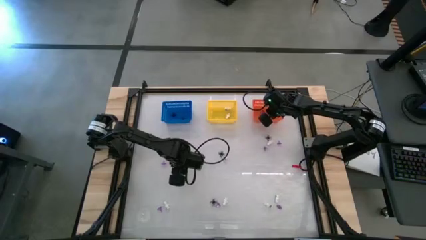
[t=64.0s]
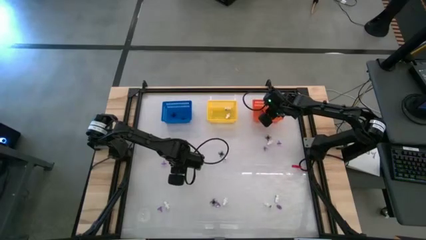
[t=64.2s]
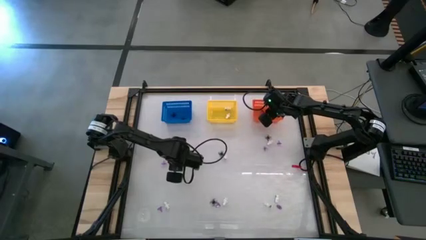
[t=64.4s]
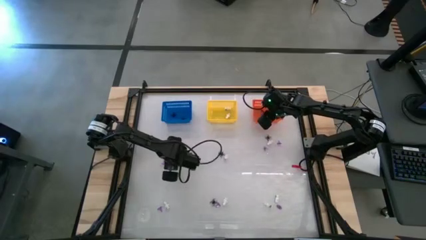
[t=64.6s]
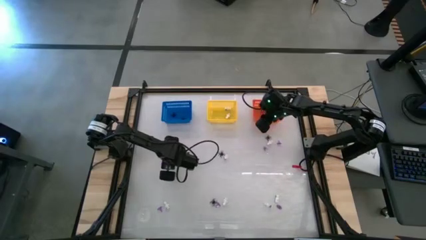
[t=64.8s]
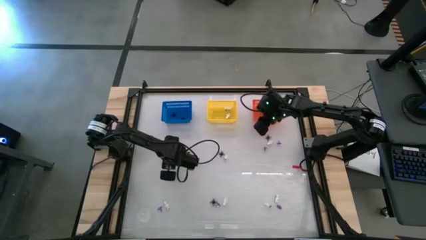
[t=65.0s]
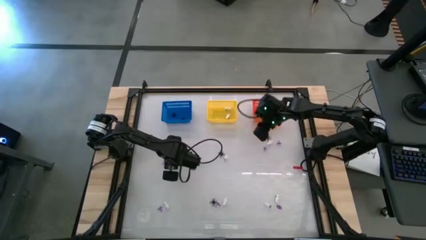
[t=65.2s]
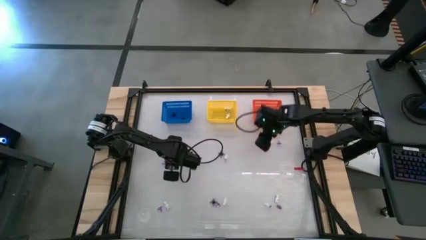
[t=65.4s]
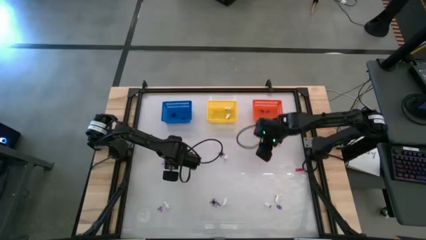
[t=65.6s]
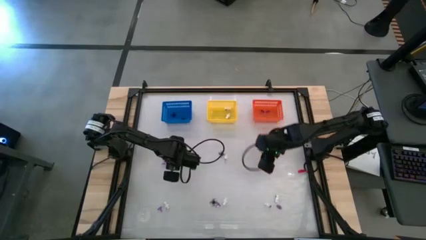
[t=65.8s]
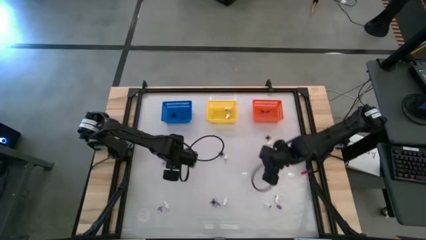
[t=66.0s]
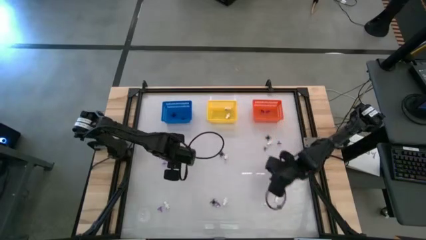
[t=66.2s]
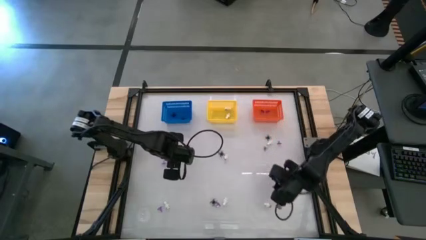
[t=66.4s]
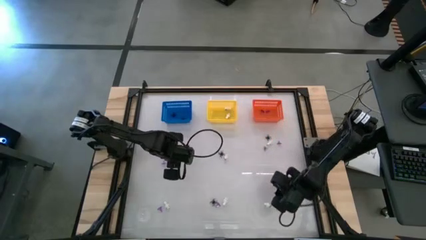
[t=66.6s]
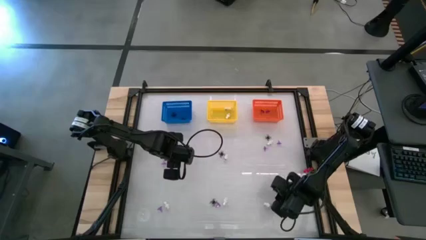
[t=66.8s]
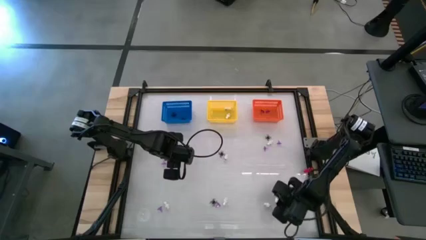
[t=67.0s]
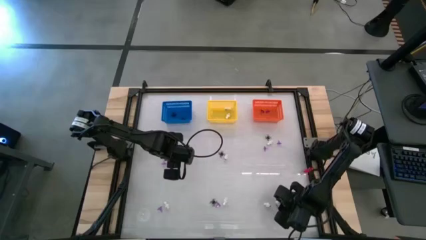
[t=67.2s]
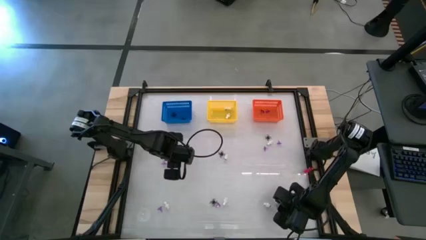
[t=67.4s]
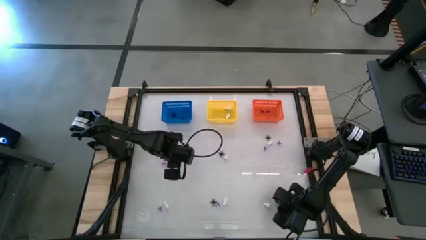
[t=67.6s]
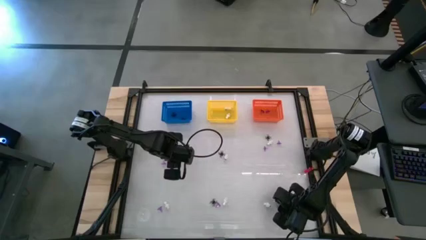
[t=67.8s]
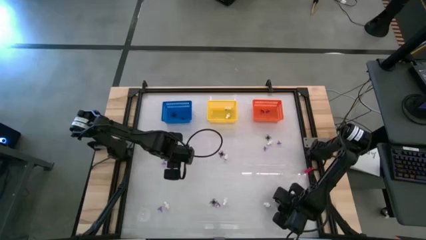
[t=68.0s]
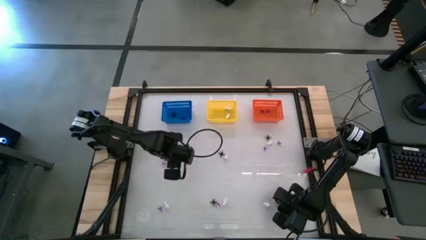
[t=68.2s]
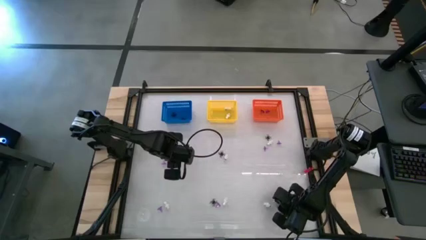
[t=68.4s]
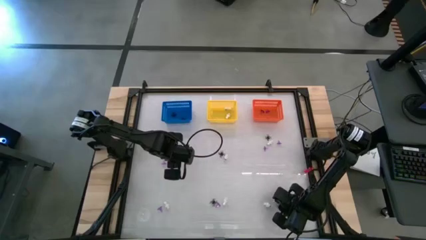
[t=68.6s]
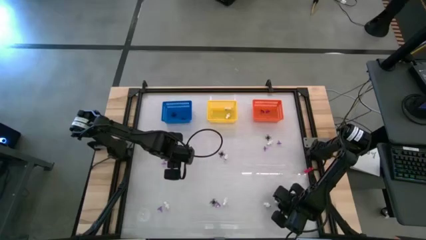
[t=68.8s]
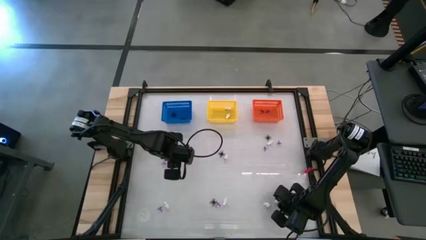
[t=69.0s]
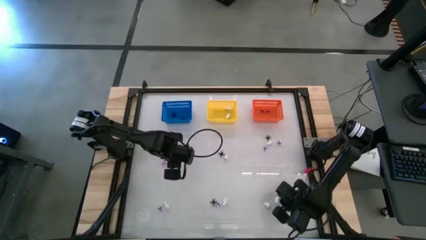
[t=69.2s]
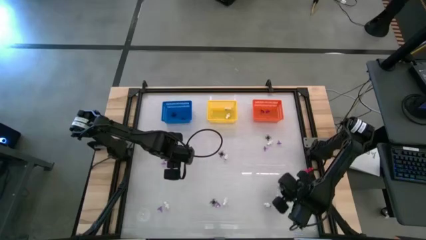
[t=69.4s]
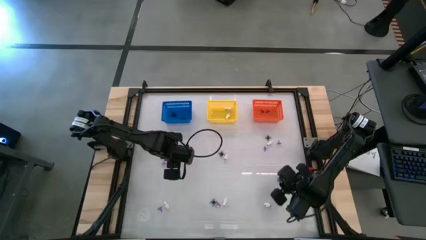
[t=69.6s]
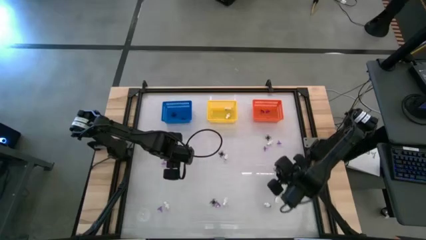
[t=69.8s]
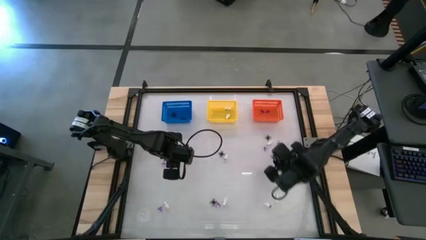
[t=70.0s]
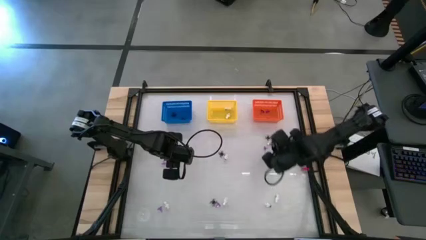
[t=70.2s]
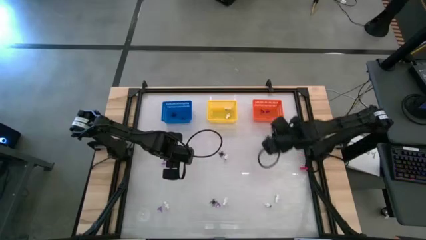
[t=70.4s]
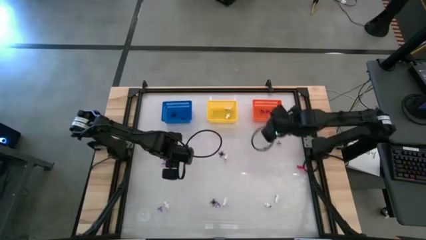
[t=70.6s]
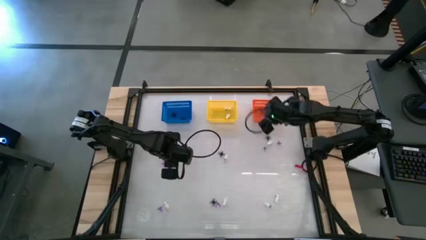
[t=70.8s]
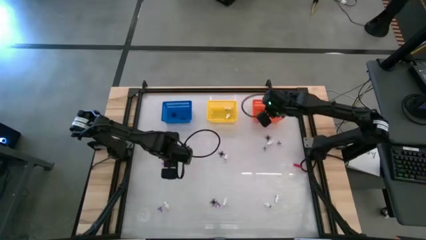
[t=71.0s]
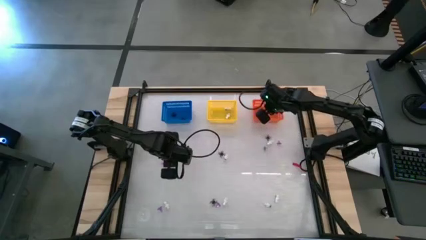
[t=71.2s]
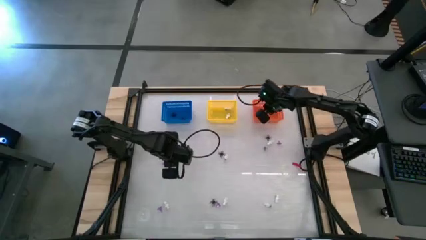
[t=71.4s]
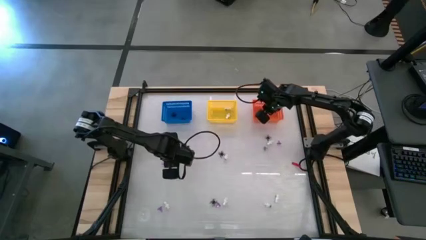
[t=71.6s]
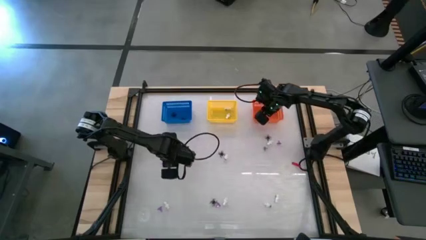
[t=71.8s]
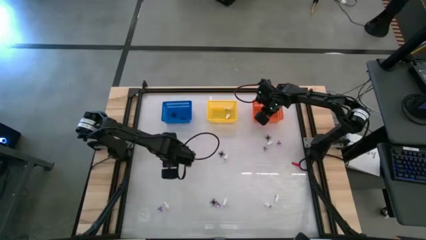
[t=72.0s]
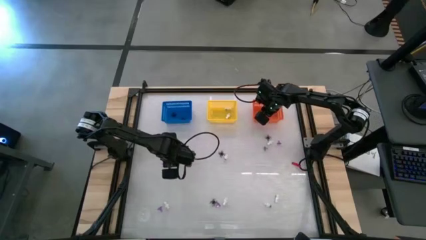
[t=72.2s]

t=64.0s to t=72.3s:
Task: Sort Halloween decoration
Put the purple witch hat toy into the orange basket

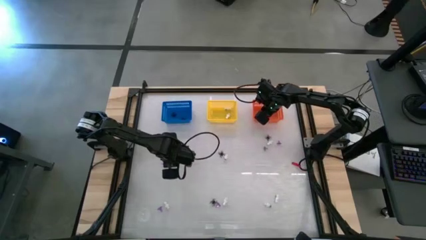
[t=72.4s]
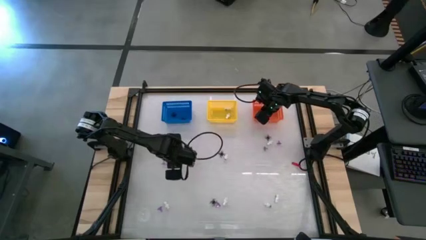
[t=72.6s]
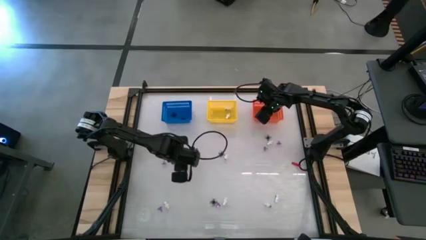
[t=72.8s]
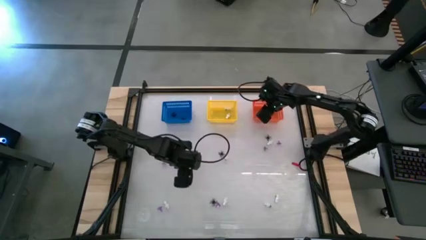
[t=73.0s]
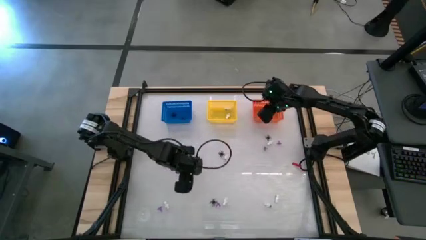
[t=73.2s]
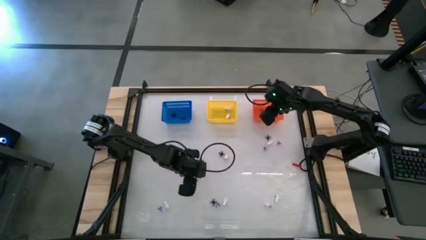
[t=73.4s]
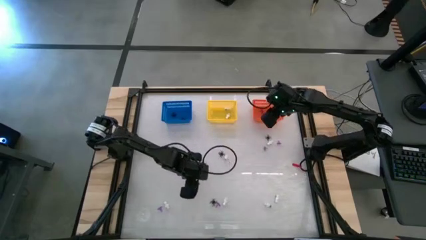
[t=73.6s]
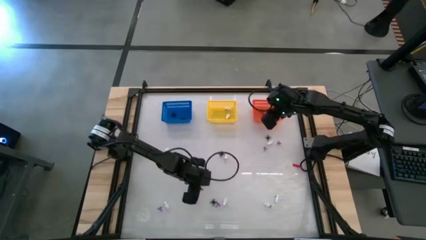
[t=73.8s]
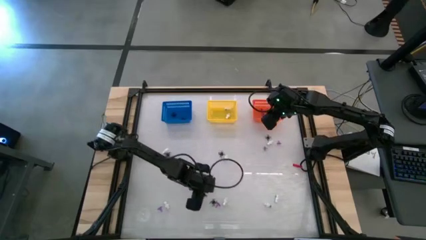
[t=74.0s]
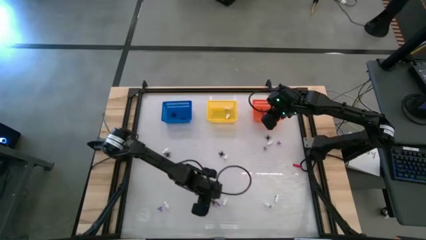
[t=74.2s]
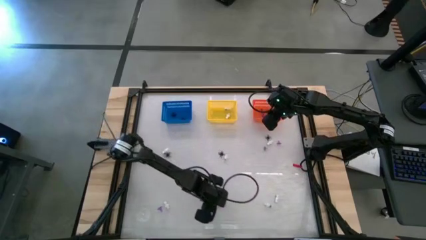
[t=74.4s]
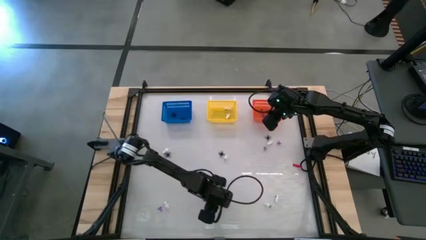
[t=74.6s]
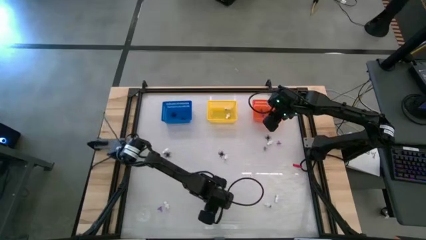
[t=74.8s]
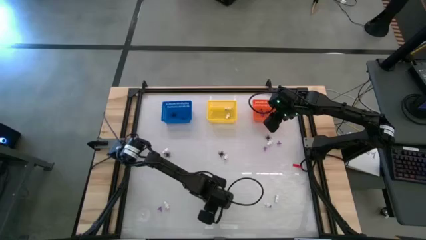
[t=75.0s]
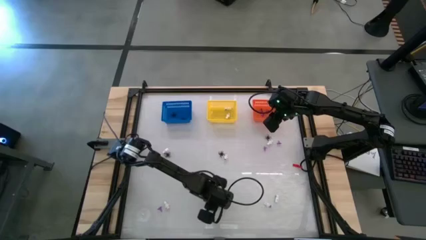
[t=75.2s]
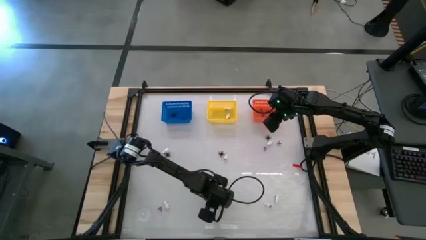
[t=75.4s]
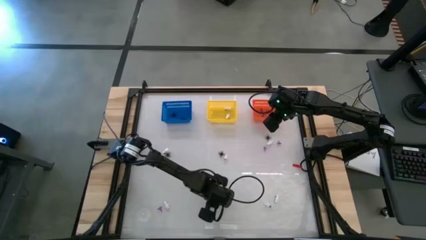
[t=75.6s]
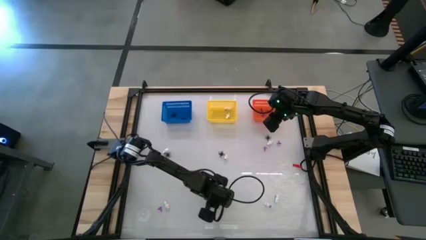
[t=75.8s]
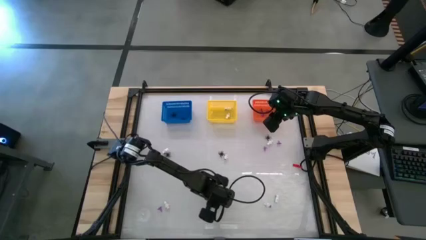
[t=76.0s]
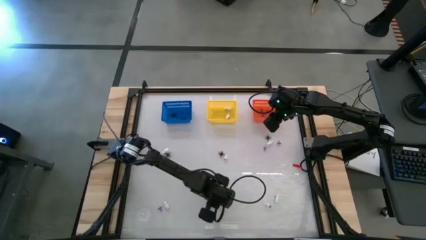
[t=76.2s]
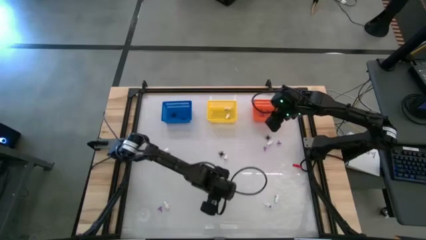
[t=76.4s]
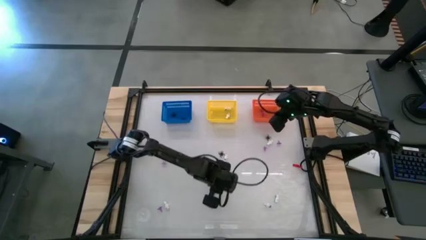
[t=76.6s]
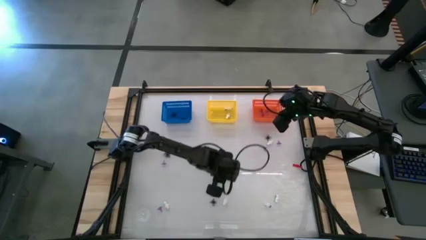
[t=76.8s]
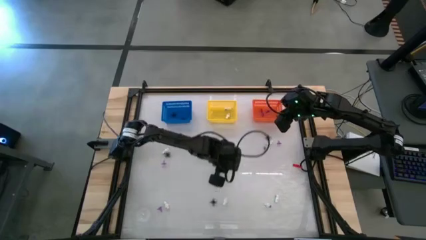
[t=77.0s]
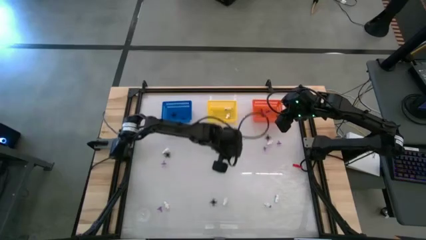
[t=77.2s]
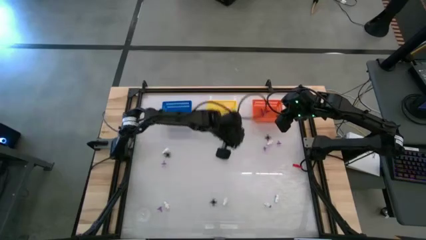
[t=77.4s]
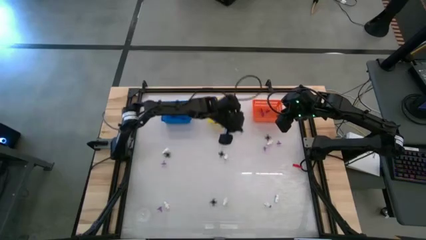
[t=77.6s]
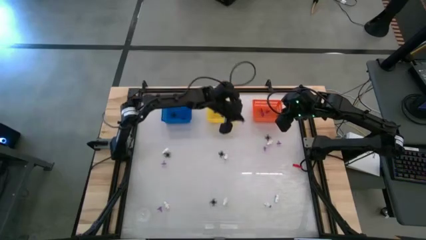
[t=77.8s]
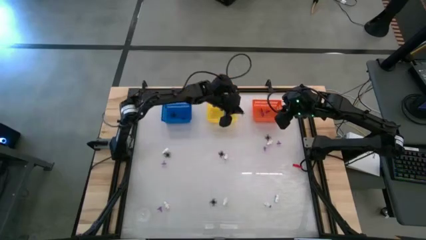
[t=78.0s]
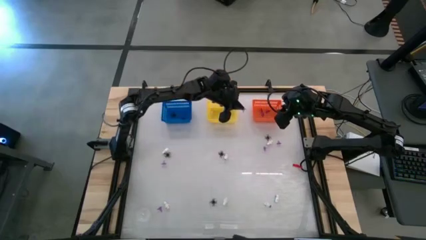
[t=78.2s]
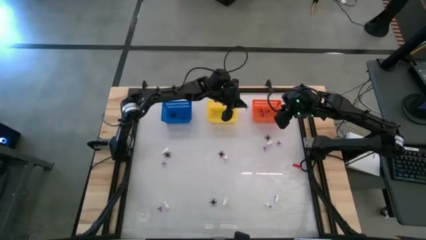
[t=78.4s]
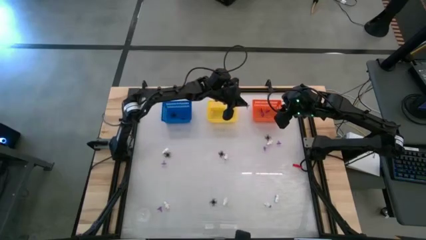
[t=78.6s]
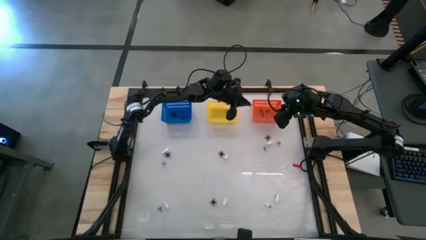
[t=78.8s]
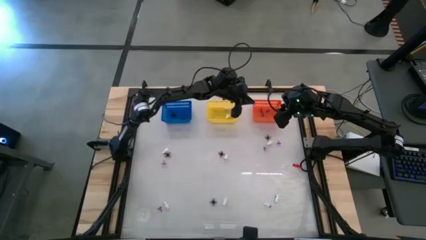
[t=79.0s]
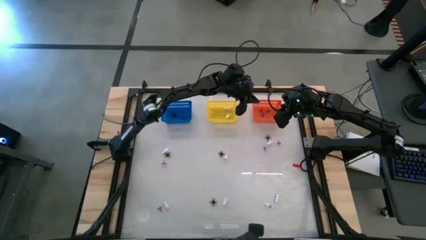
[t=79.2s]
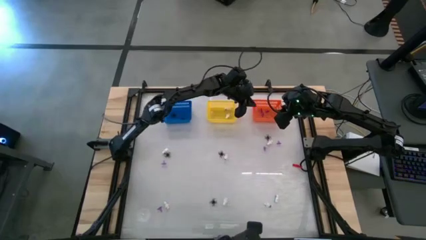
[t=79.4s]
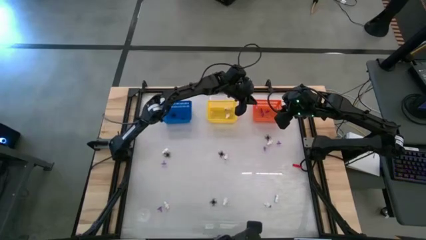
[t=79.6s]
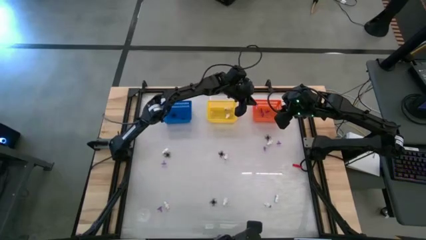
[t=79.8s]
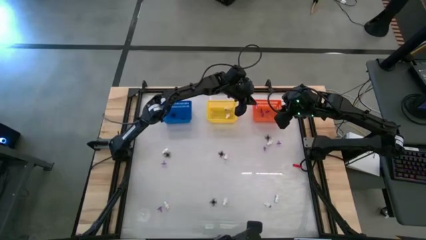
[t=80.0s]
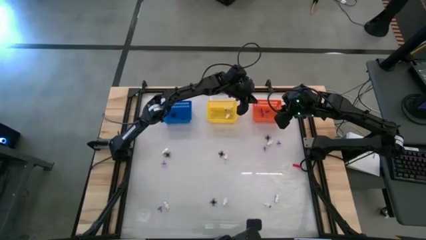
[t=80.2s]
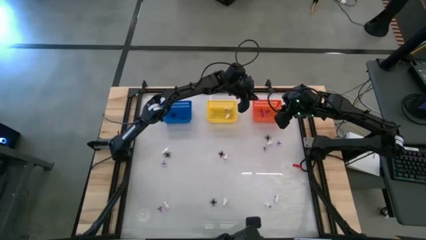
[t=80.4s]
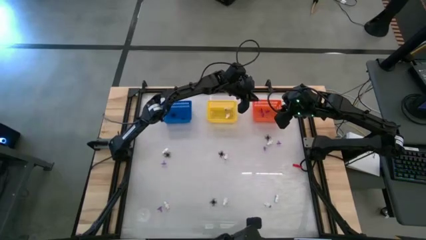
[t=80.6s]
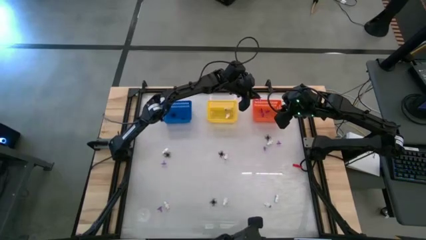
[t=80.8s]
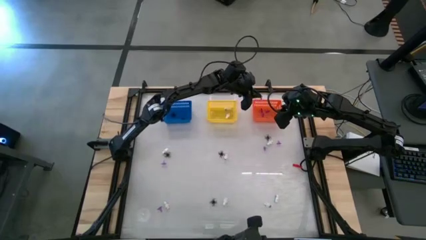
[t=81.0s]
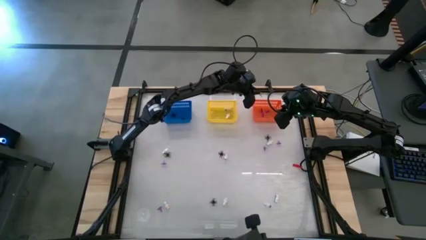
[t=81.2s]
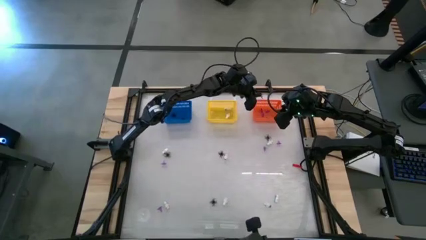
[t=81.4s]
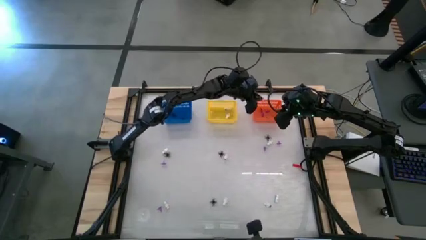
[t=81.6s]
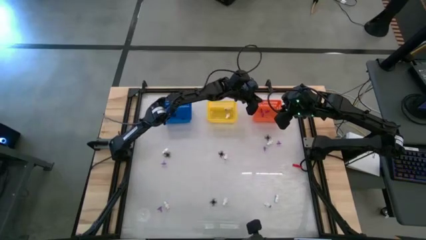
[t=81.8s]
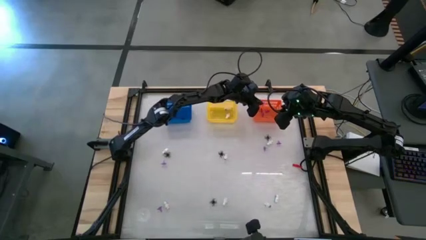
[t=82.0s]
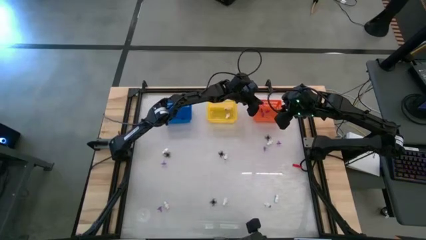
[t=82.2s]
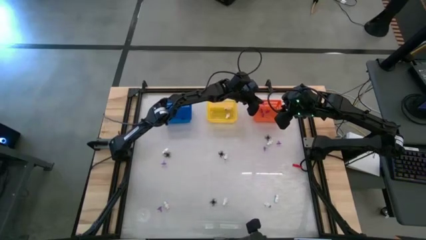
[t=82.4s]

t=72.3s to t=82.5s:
Put the purple witch hat toy into the orange basket
